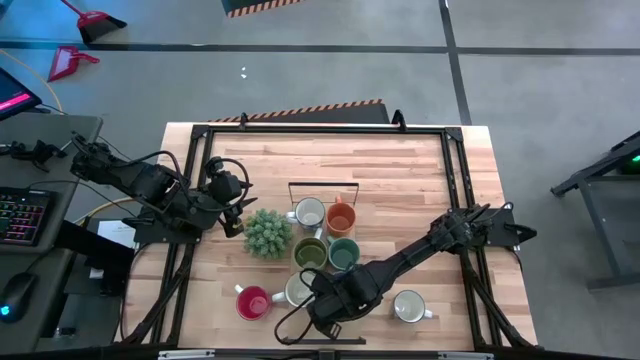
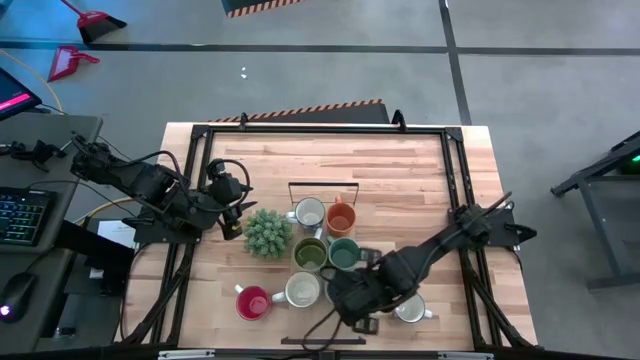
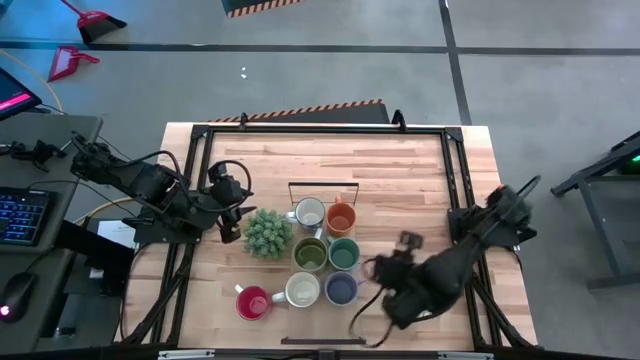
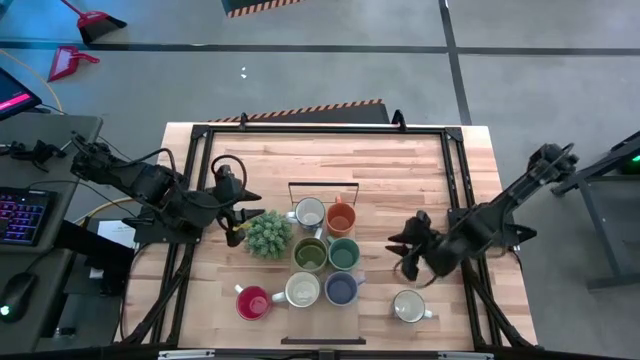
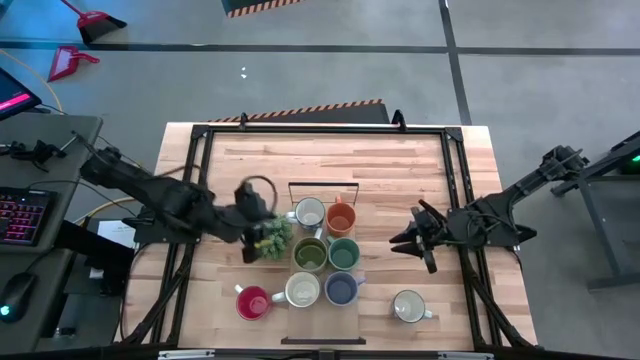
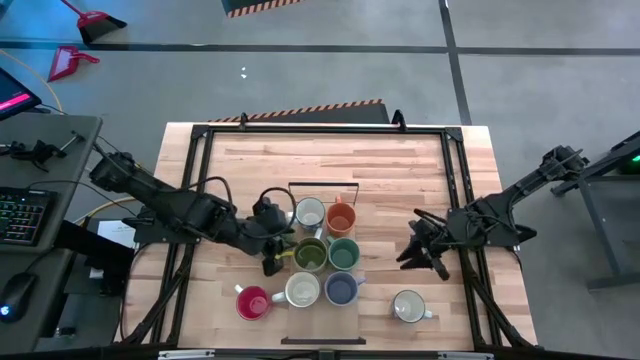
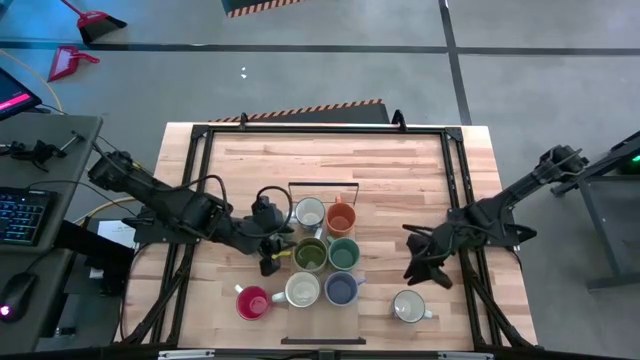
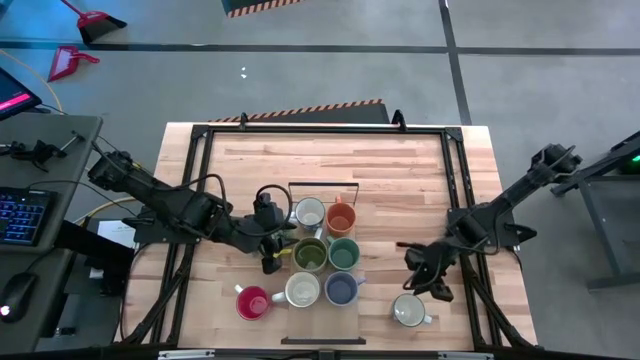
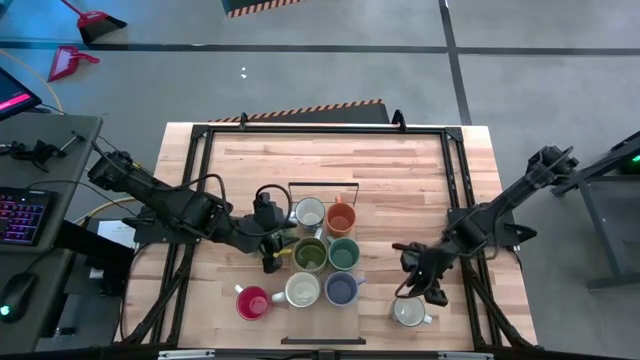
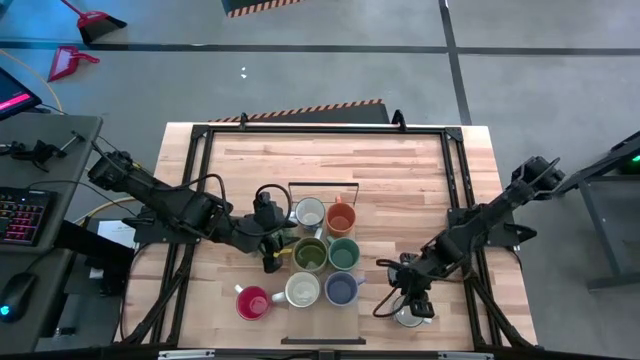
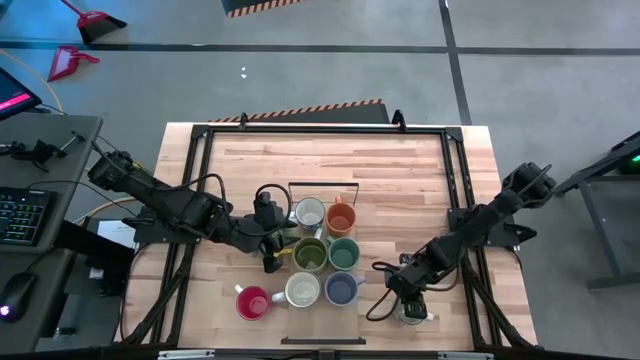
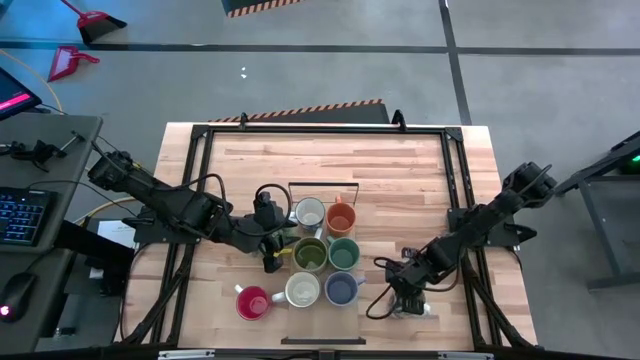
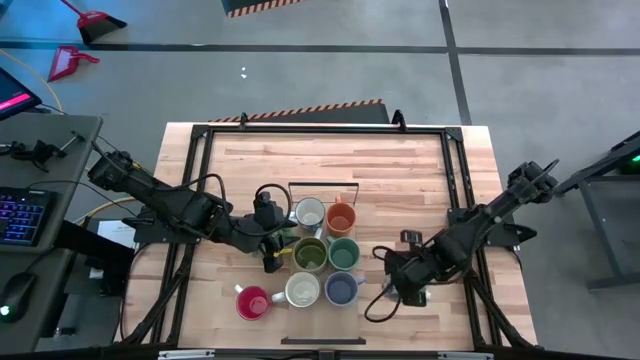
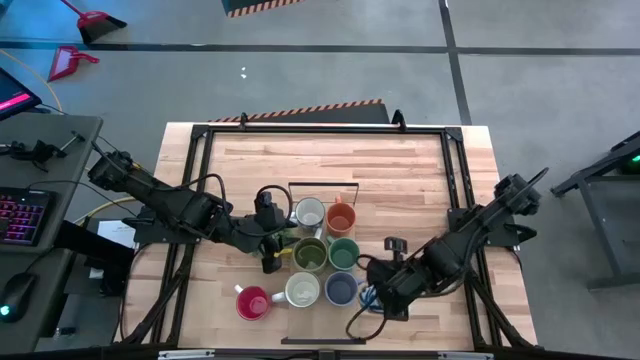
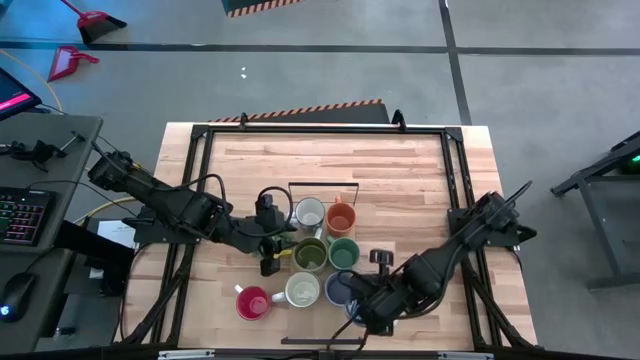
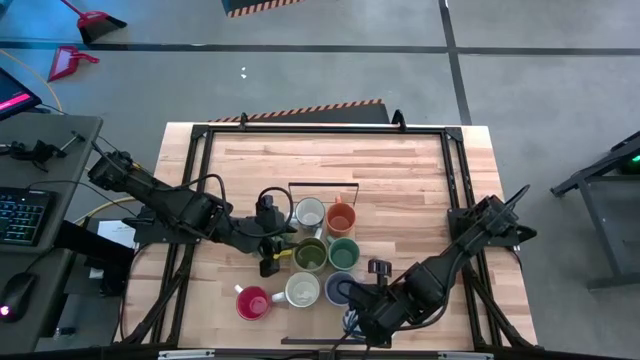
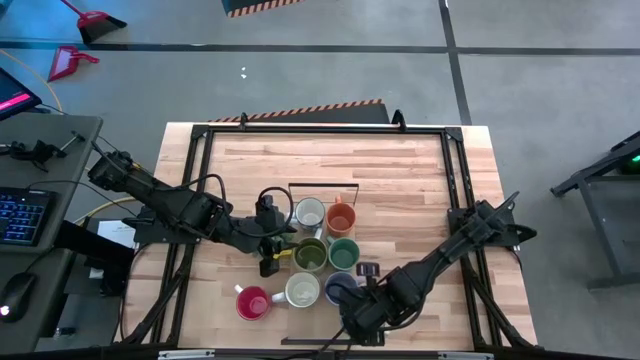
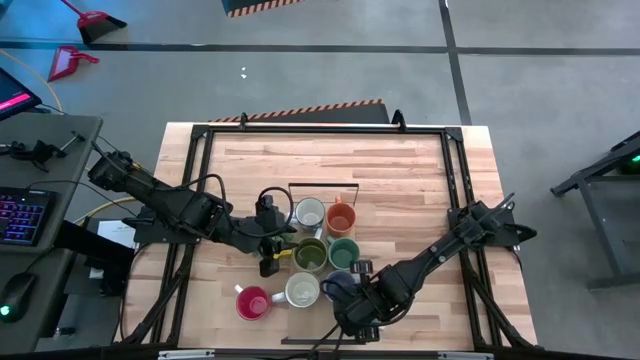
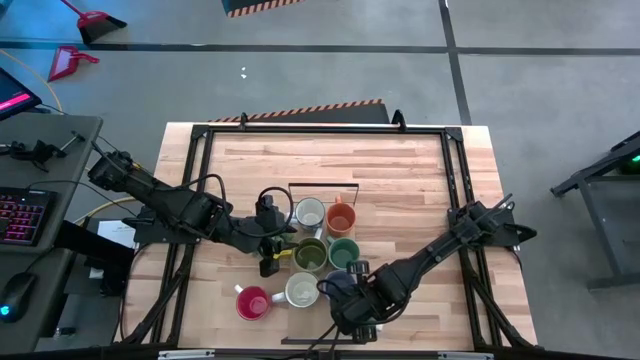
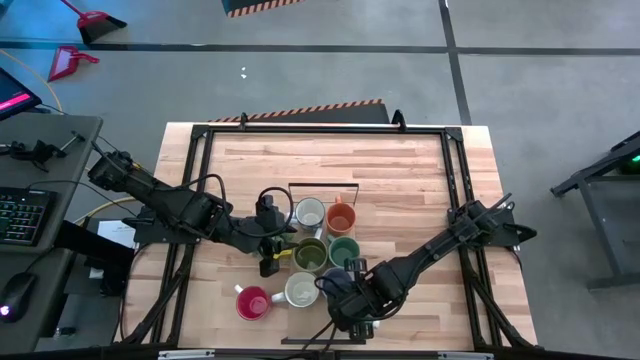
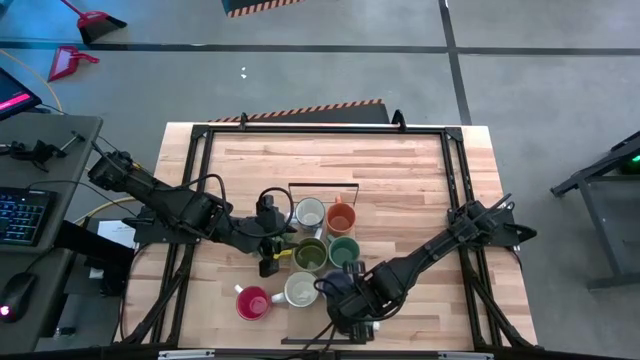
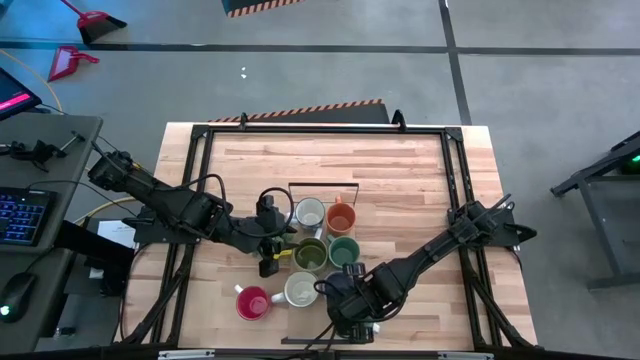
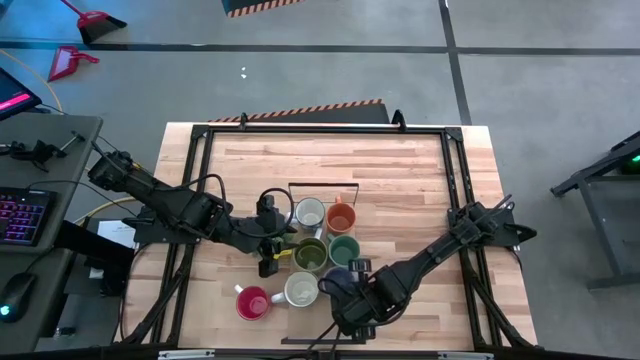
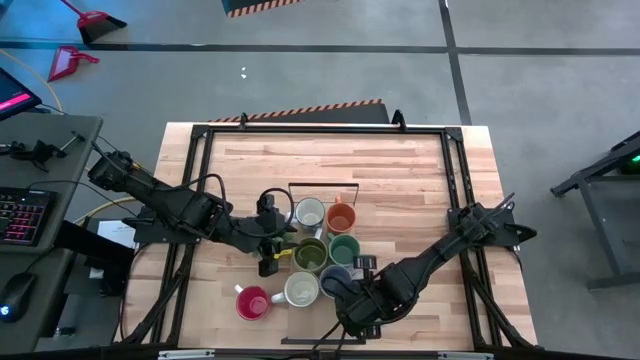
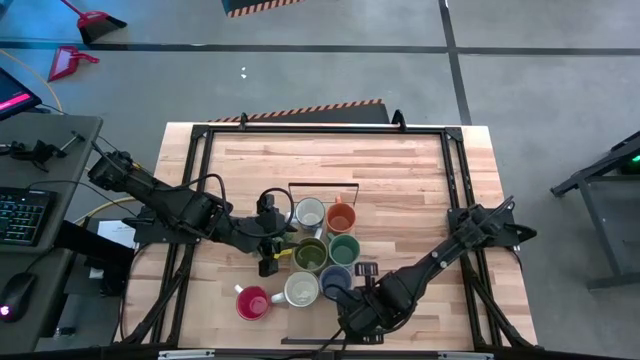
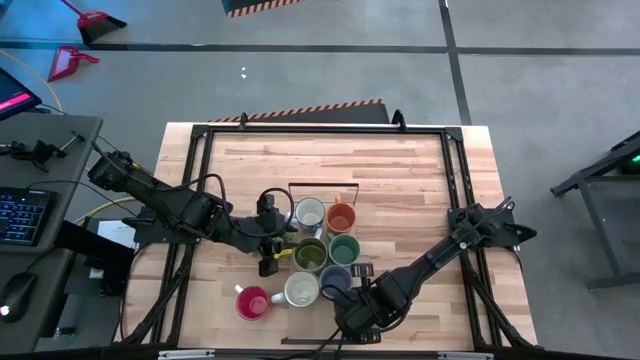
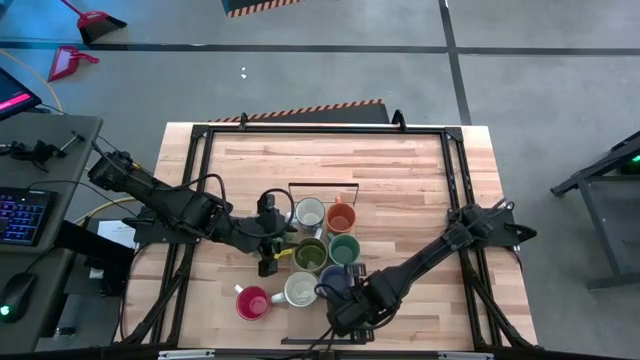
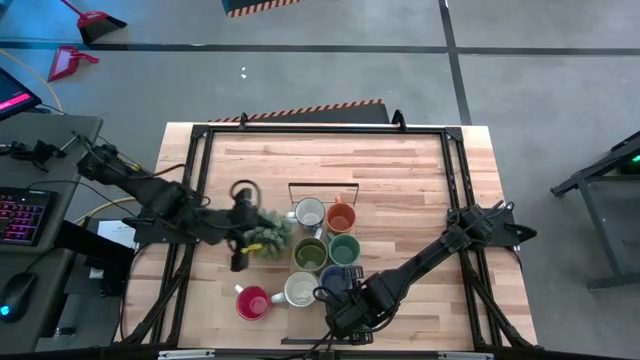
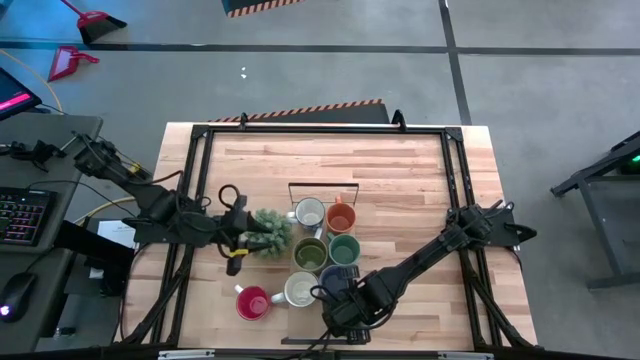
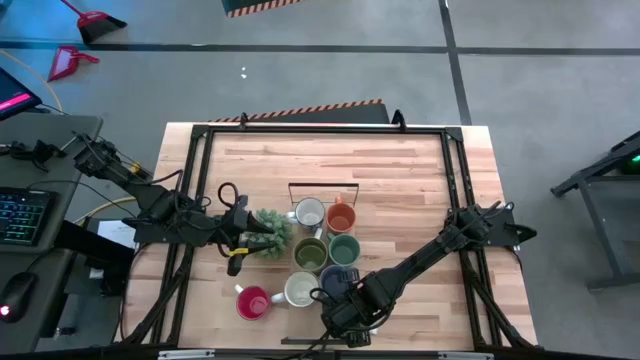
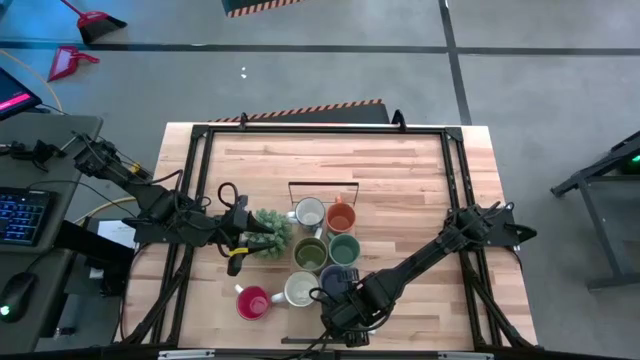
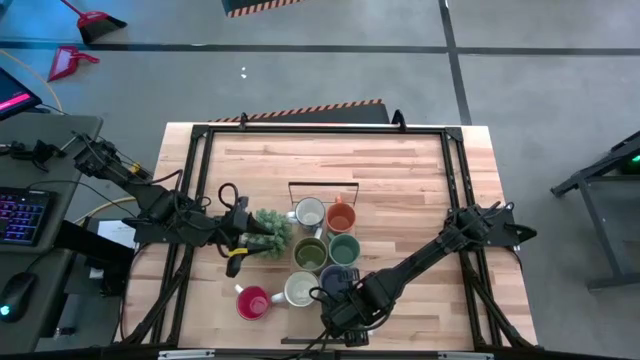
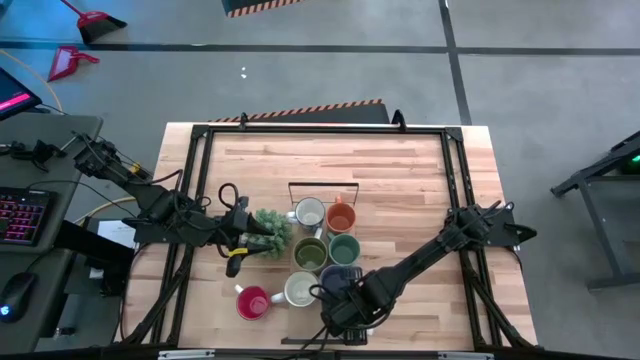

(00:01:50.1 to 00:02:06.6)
Task: Place coffee mugs
Put the blue patterned mug on the shelf

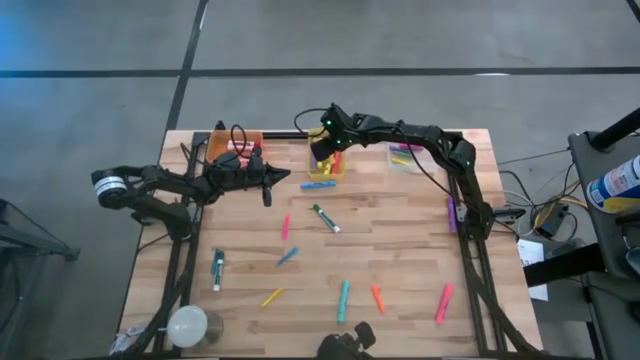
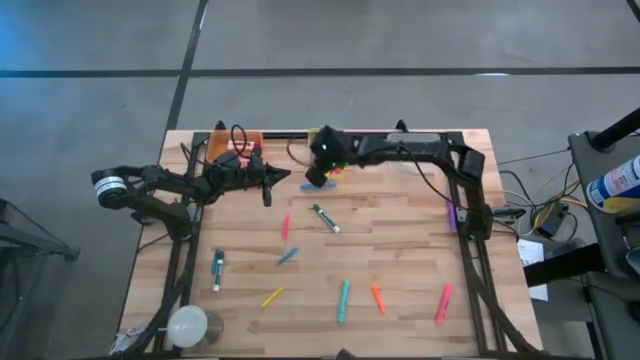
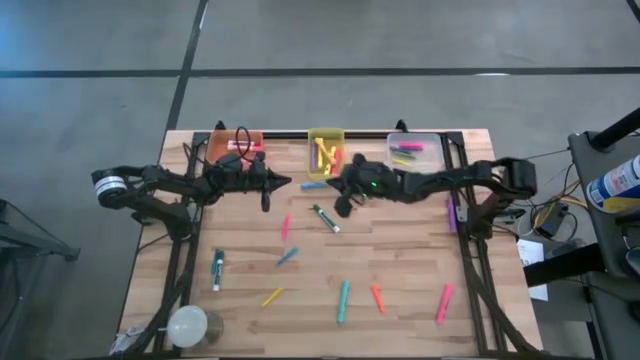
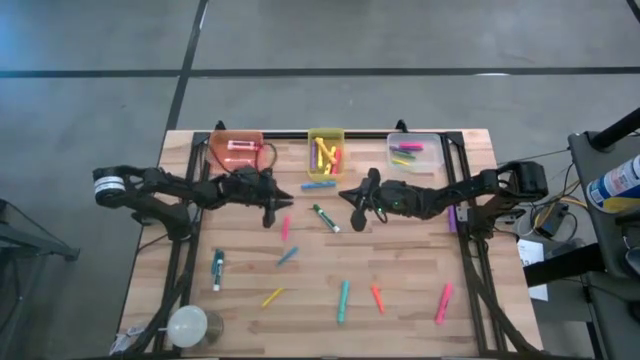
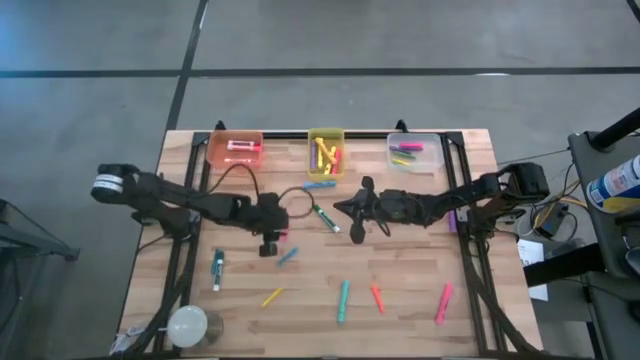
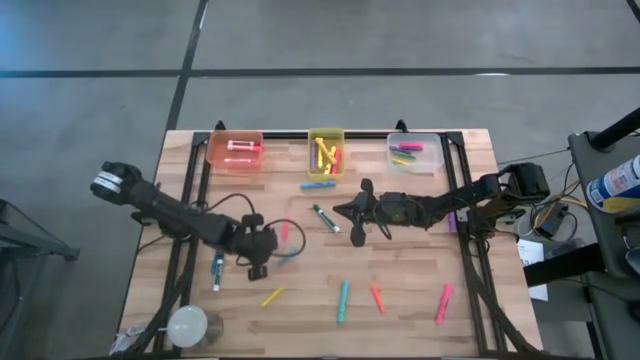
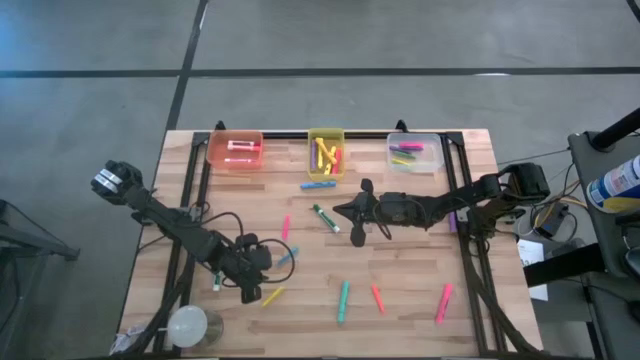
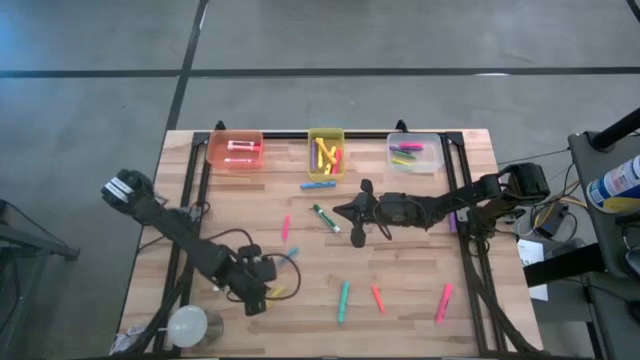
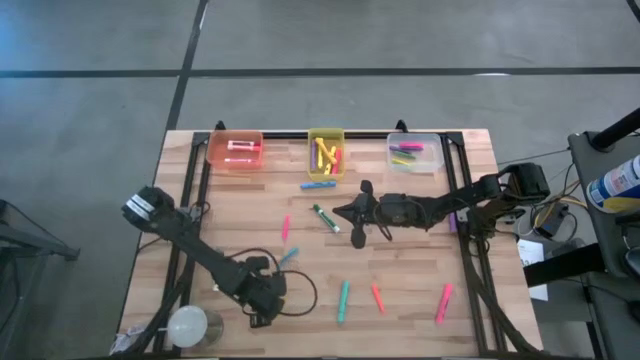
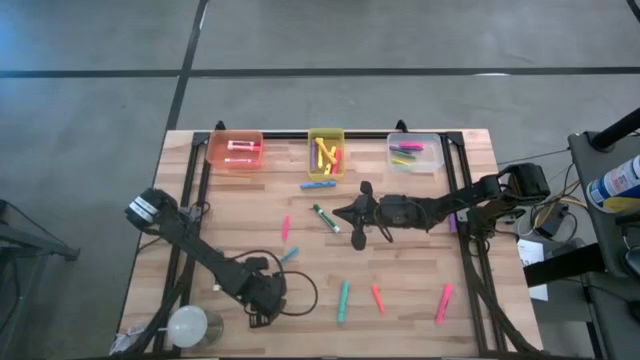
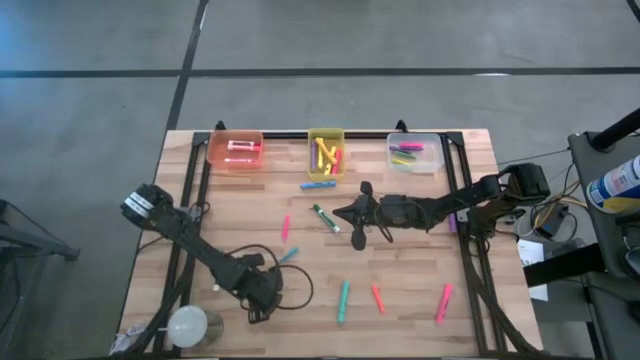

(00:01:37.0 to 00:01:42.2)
Task: Pick & Place Markers
Put the yellow pen into the transparent bin
